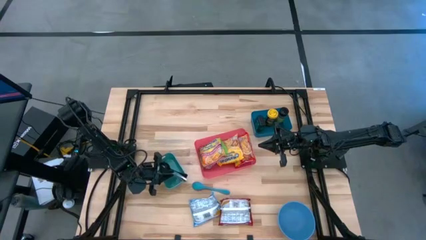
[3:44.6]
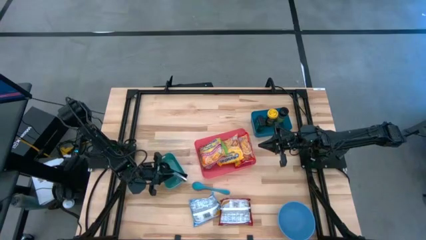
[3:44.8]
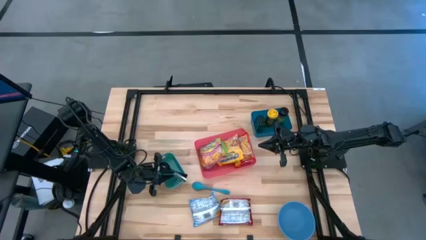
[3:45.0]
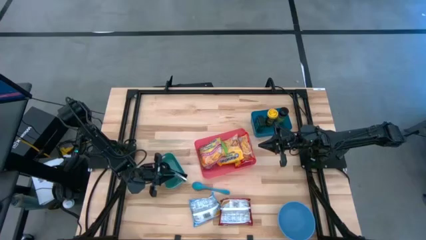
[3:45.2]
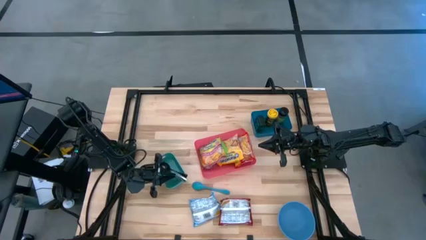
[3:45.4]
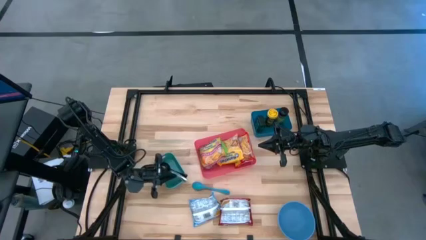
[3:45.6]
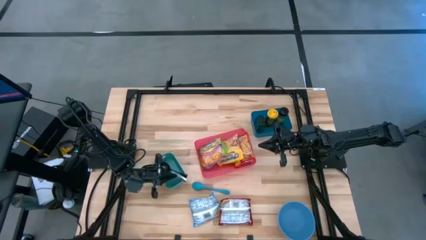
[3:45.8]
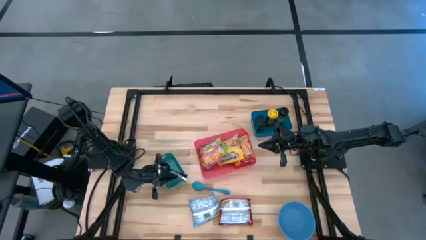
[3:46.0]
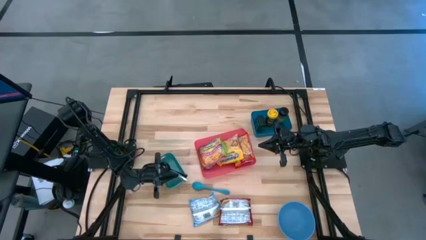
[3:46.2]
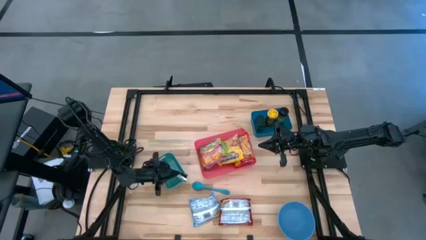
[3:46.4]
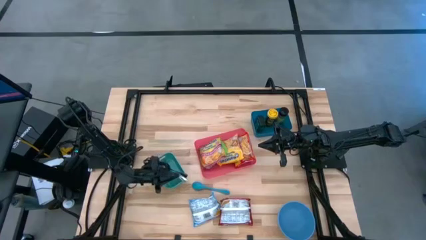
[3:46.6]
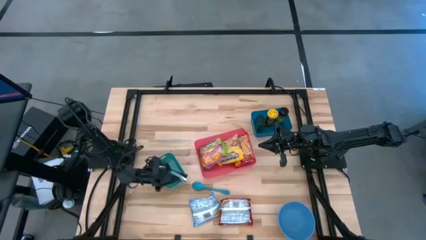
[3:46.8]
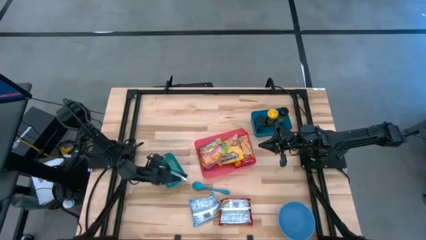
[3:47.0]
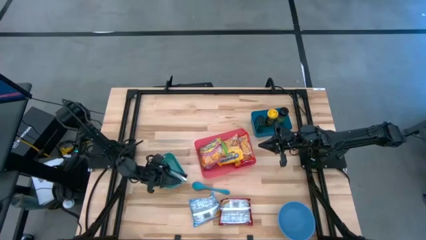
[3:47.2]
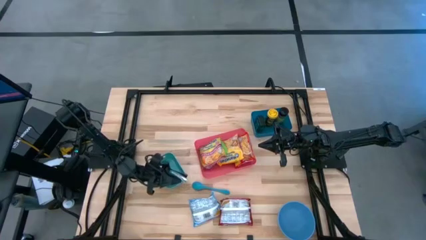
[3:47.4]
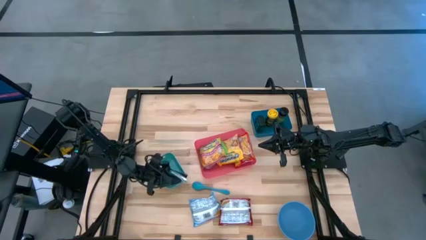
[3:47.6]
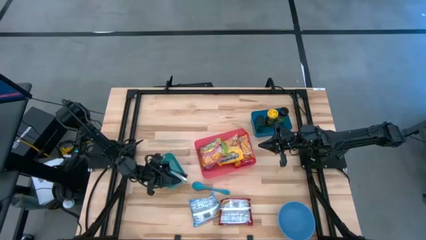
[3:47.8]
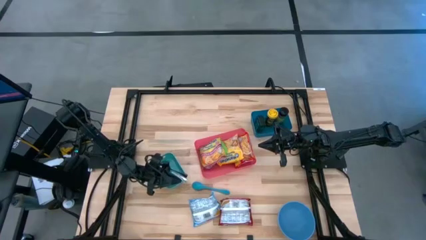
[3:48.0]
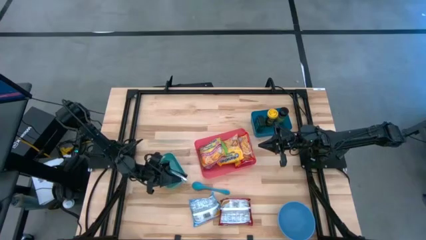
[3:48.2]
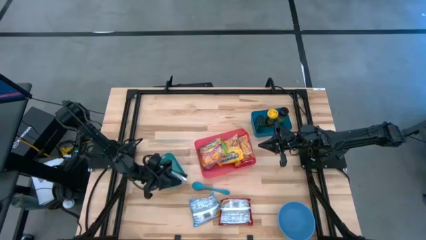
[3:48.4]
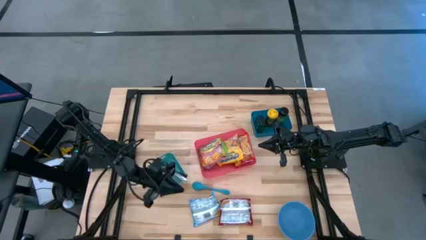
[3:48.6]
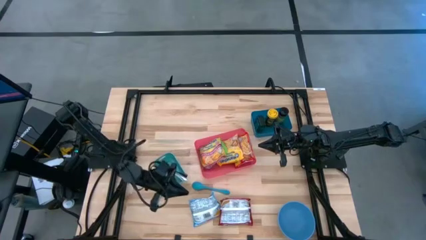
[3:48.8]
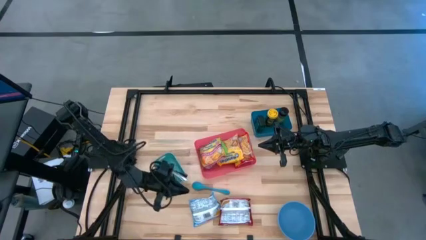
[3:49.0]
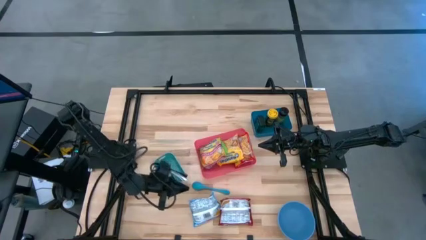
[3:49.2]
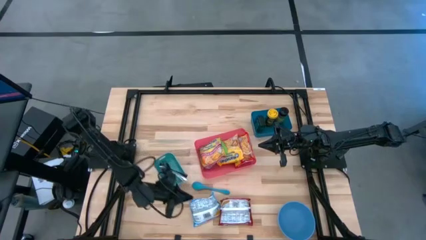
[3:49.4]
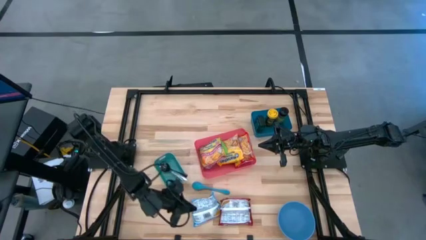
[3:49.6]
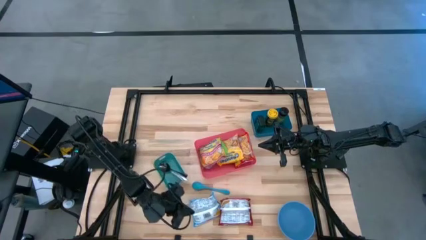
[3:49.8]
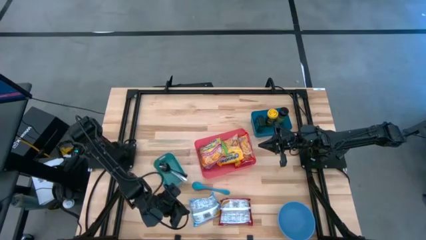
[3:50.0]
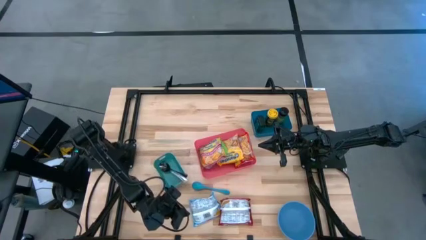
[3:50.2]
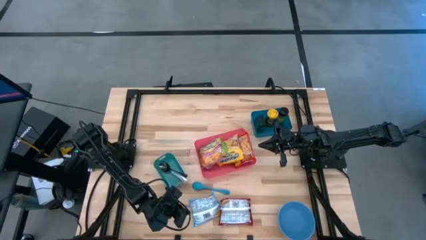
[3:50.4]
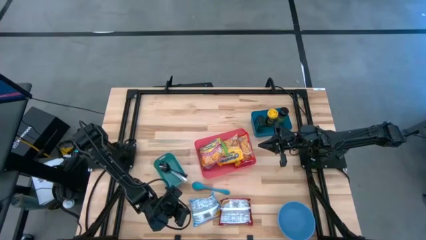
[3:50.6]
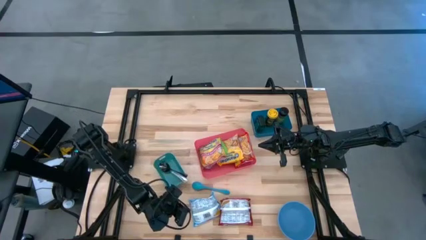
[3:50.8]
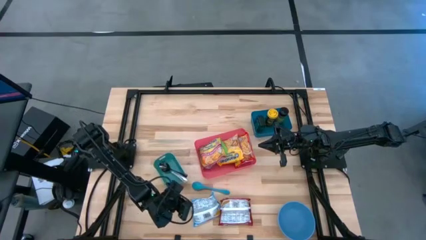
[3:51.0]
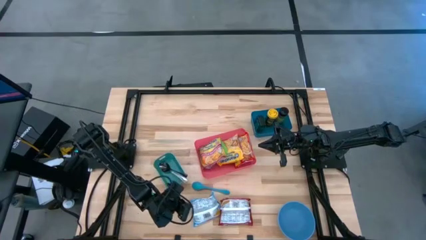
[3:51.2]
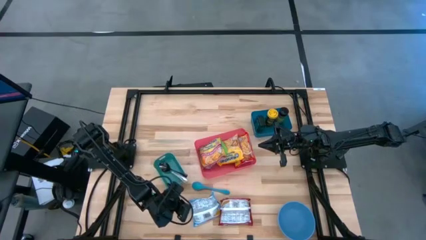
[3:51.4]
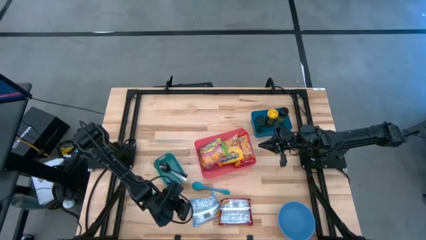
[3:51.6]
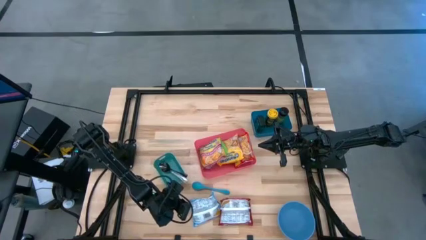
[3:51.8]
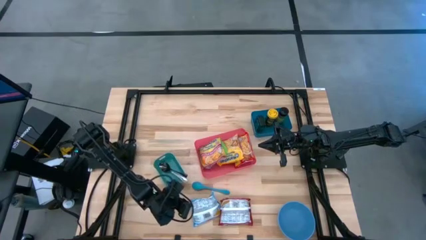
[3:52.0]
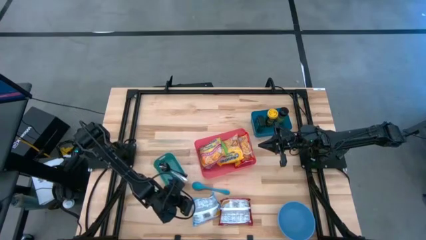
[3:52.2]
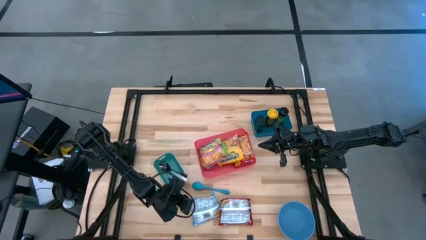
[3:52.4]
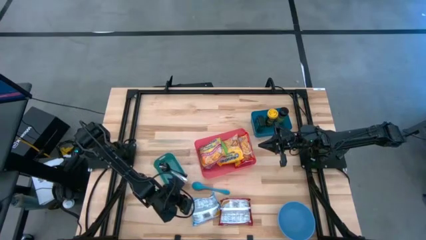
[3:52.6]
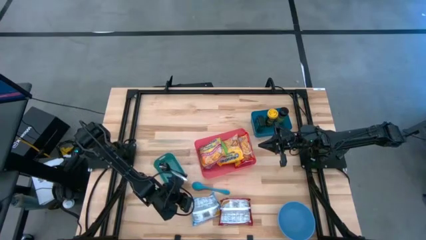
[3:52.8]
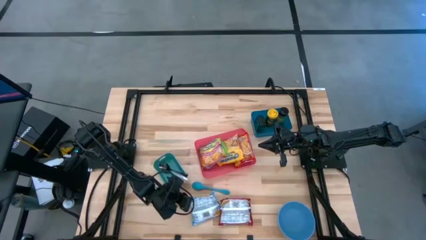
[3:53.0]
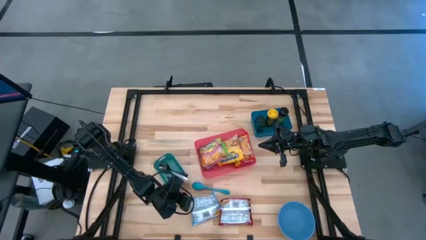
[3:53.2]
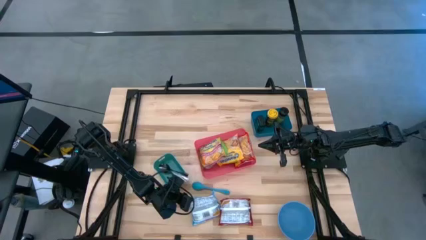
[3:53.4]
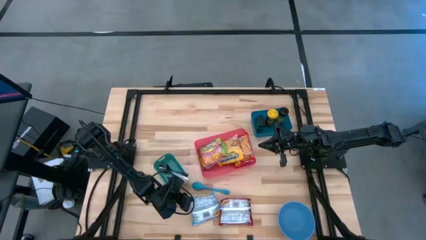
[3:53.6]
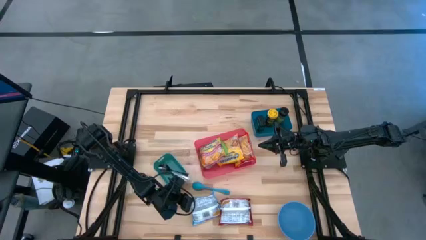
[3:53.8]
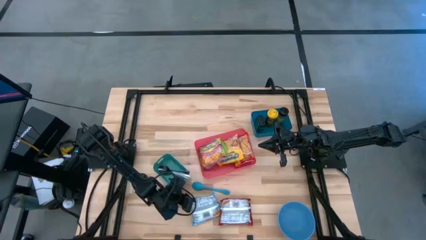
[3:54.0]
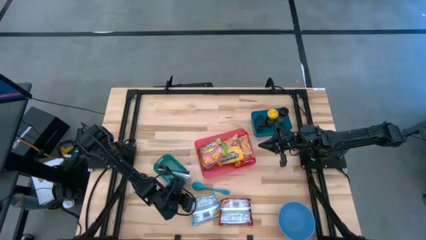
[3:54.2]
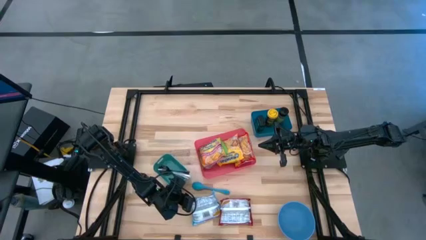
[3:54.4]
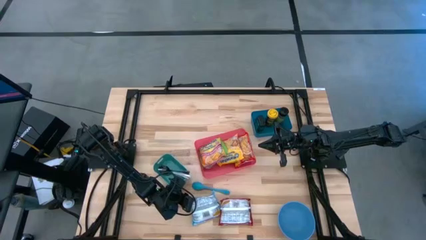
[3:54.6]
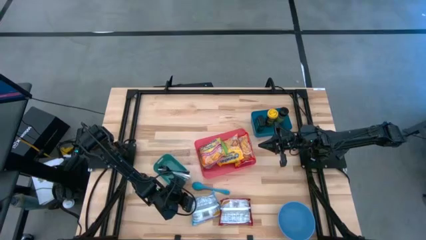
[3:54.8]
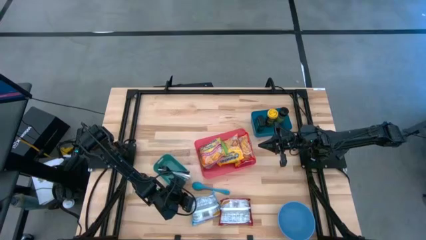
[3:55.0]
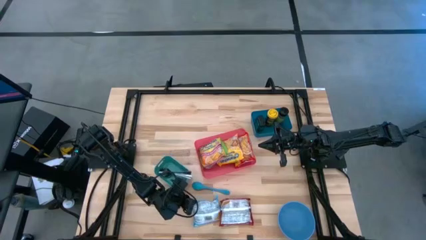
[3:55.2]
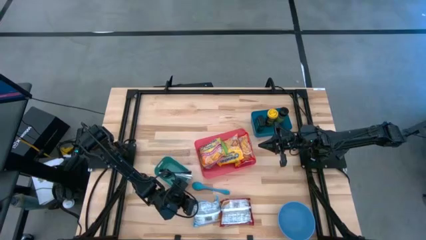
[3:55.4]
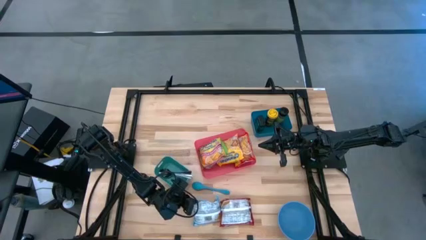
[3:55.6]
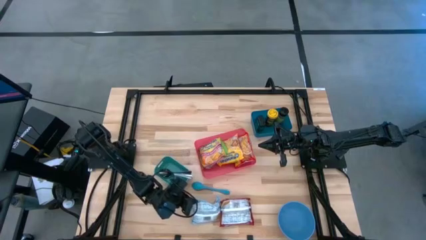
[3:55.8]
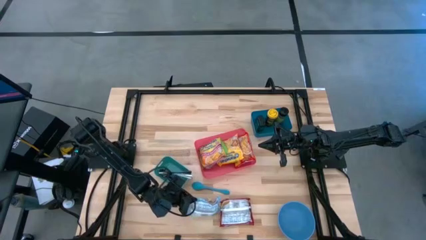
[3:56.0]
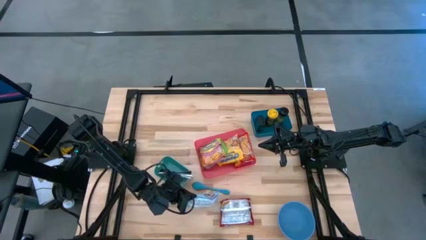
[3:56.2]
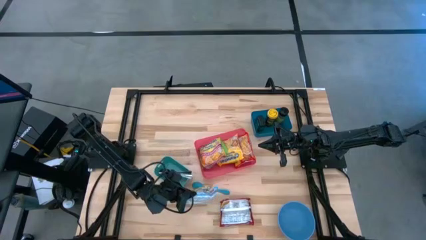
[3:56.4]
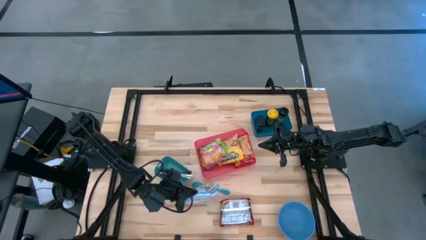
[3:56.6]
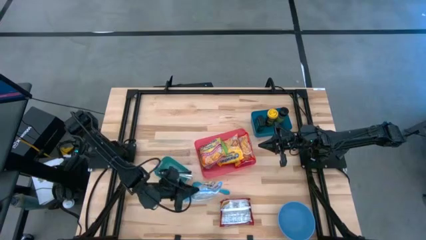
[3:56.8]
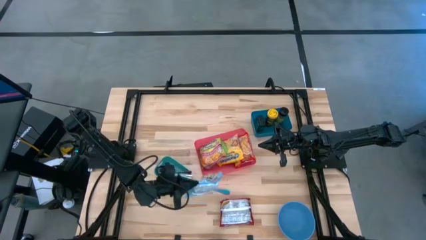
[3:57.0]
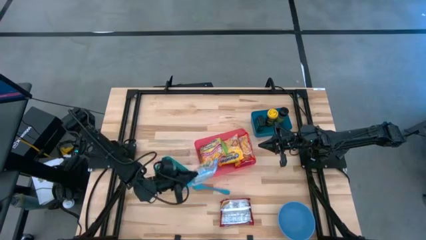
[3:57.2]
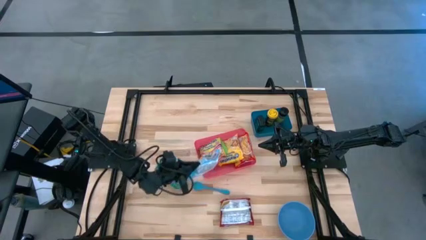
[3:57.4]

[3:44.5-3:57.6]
Task: Pick & Place Food Item
Put the blue noodle pack into the red bin

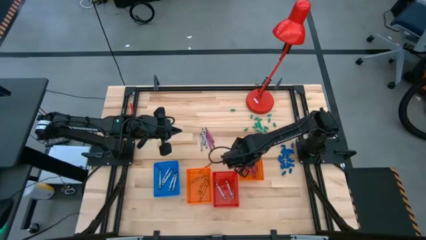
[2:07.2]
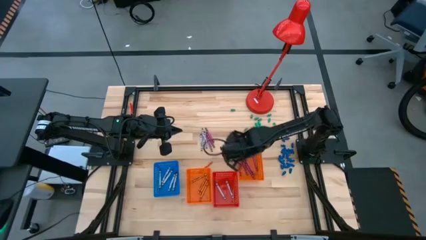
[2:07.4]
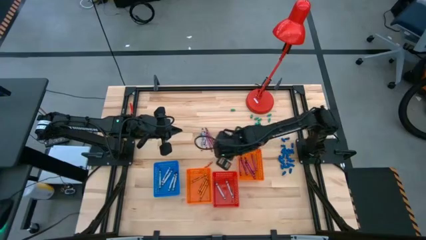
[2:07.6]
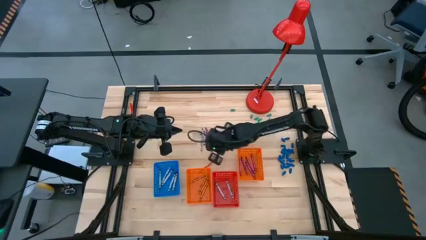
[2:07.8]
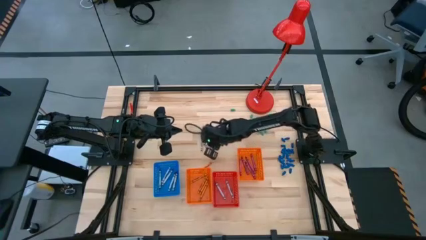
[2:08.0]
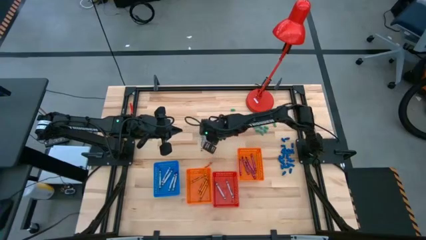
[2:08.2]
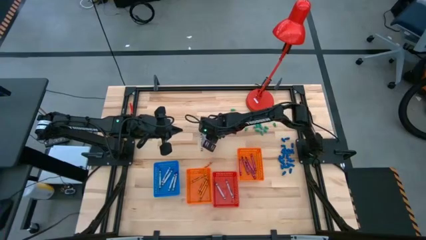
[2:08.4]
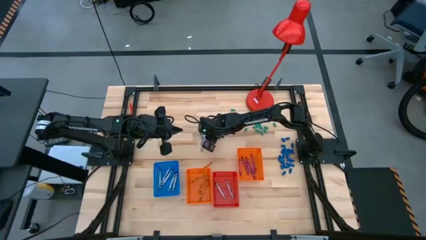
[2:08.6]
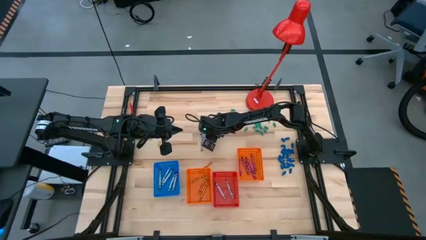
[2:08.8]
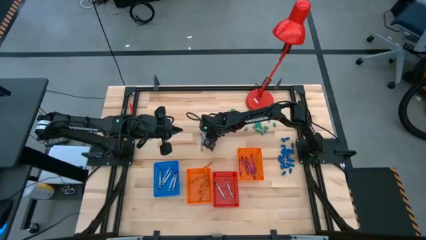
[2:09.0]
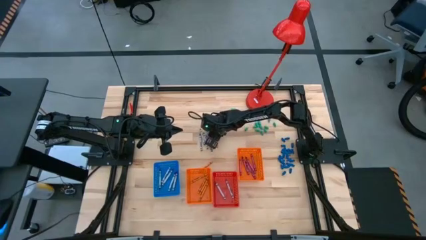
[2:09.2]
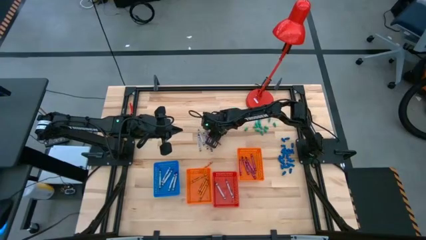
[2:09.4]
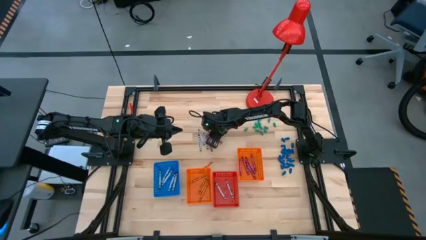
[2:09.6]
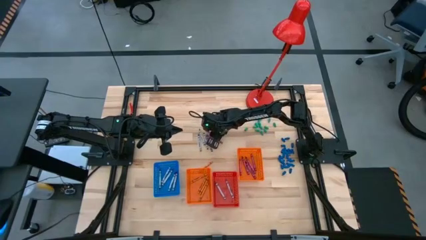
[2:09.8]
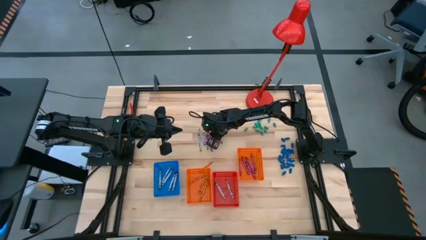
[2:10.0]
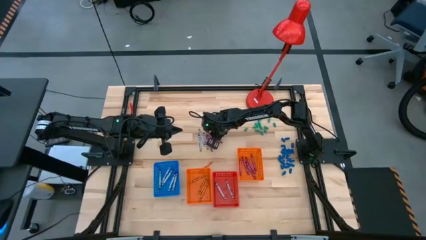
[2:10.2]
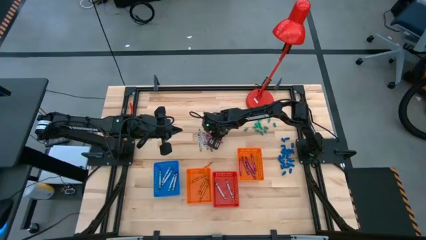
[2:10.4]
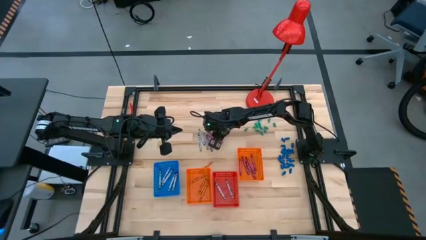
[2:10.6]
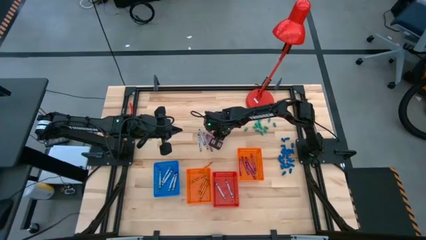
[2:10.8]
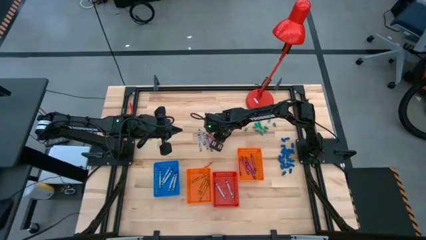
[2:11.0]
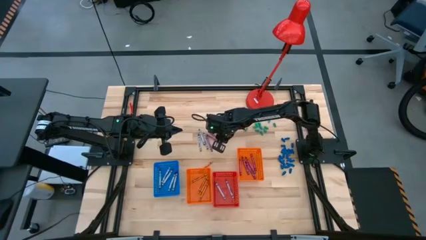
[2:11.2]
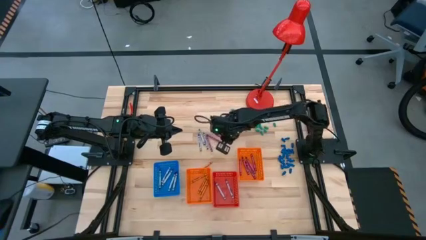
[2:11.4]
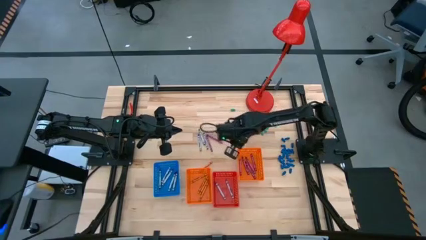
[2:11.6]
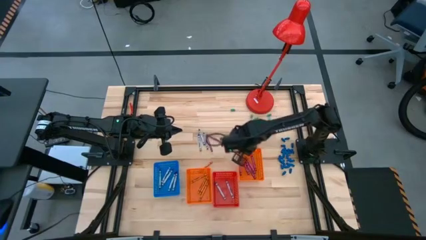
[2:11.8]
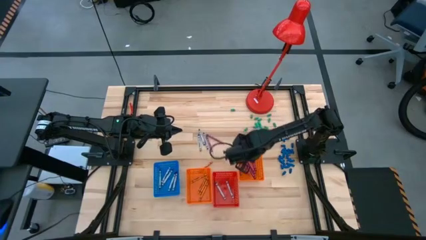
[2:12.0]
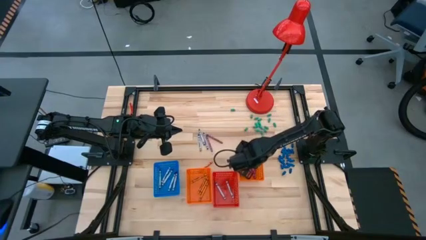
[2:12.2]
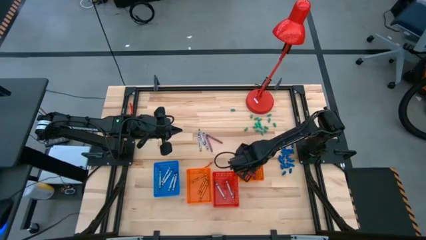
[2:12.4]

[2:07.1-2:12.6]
Task: Sort crayons
Put the red crayon into the right orange bin
